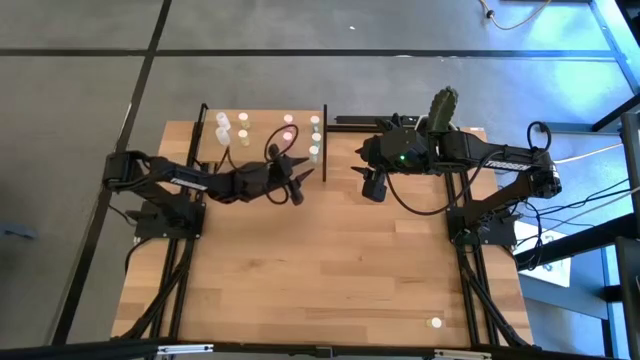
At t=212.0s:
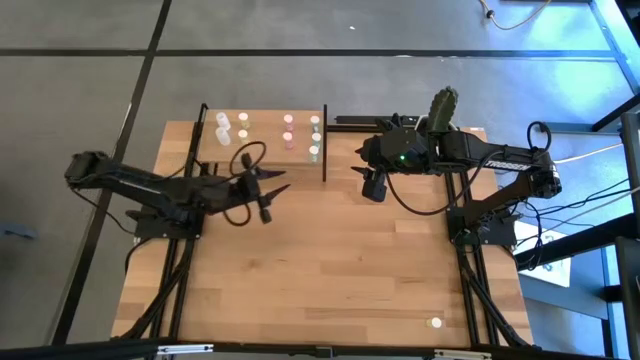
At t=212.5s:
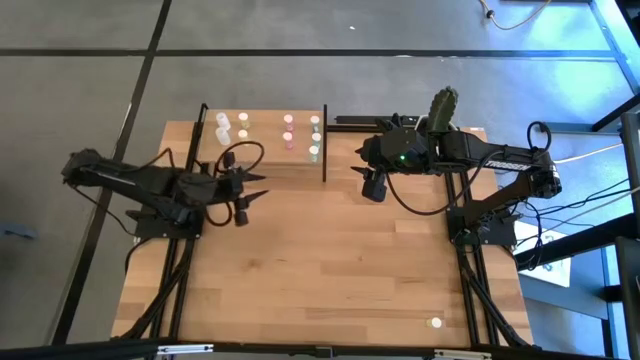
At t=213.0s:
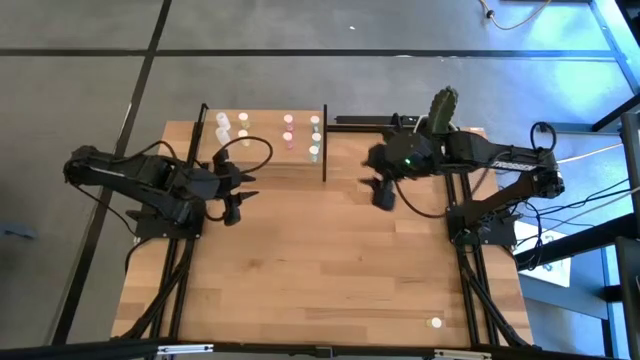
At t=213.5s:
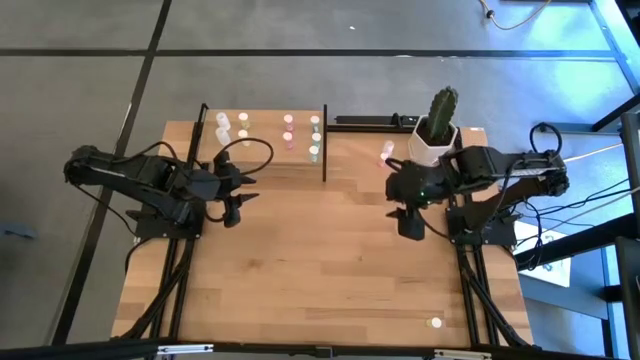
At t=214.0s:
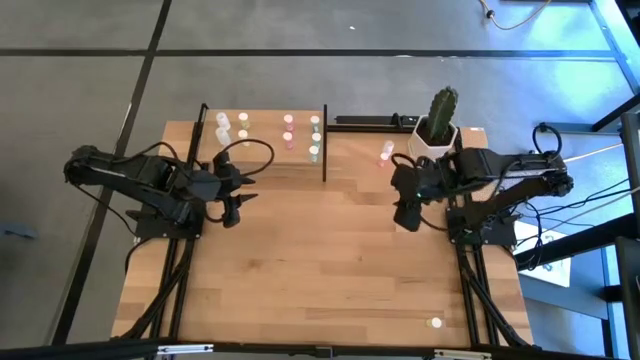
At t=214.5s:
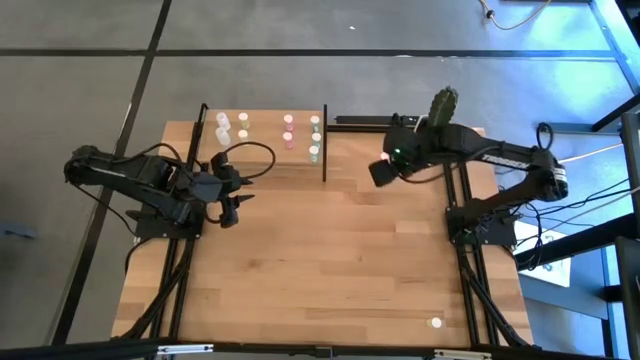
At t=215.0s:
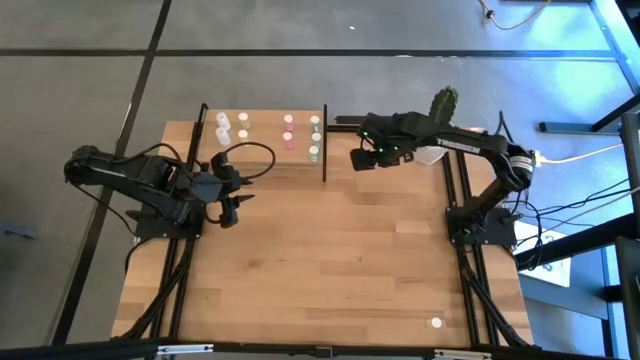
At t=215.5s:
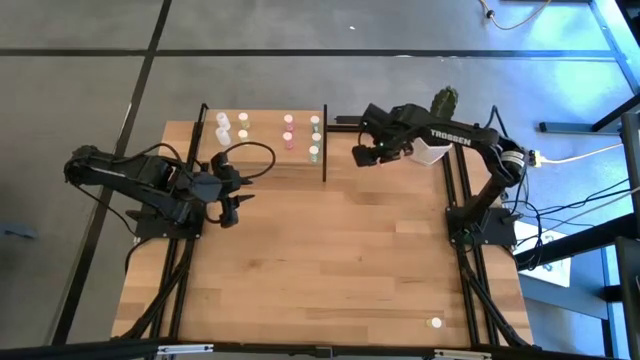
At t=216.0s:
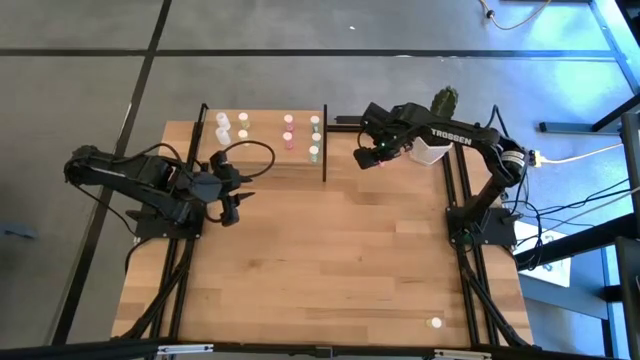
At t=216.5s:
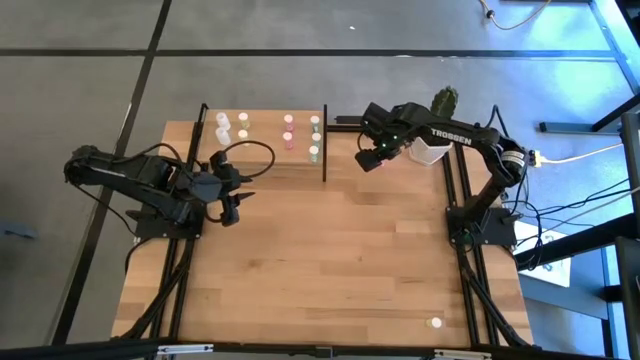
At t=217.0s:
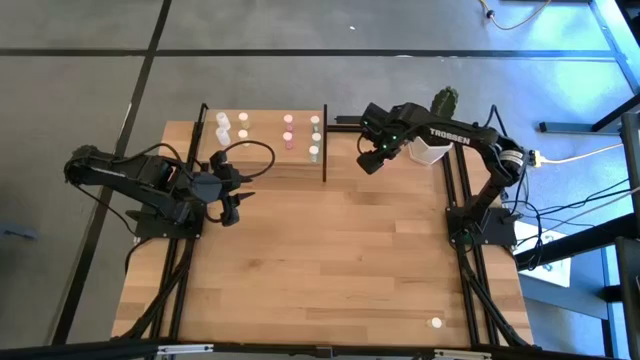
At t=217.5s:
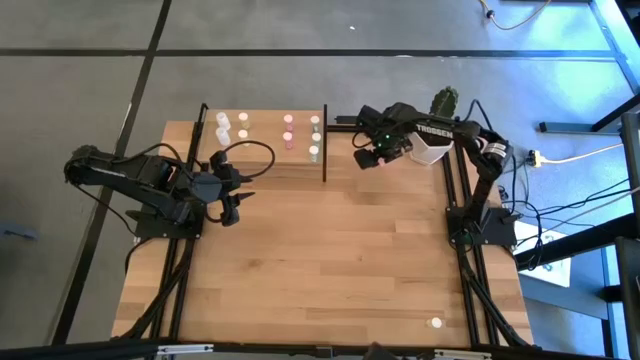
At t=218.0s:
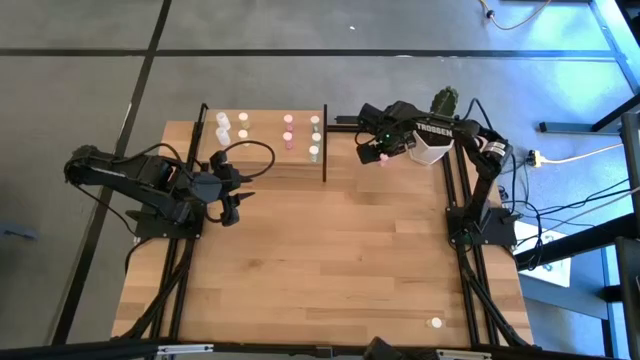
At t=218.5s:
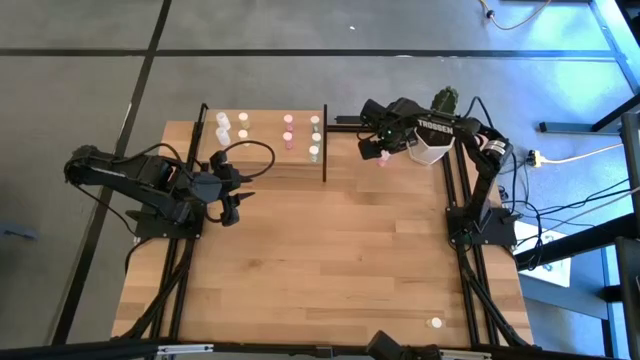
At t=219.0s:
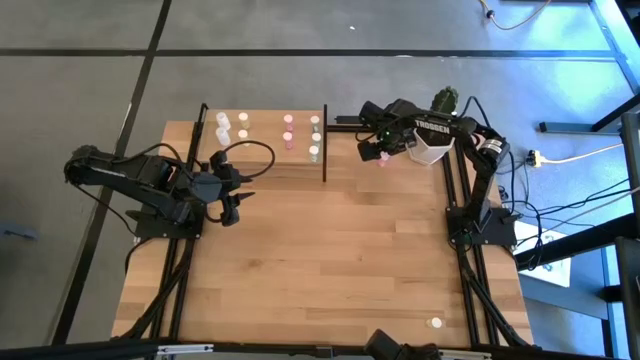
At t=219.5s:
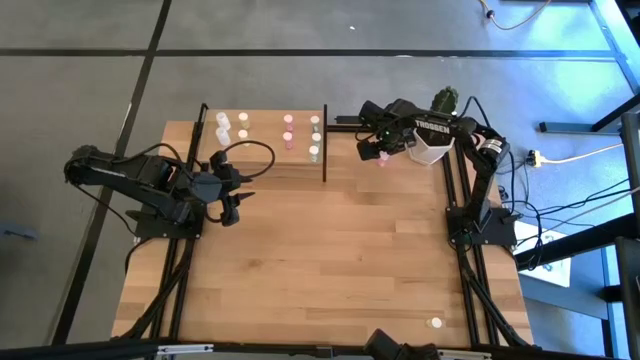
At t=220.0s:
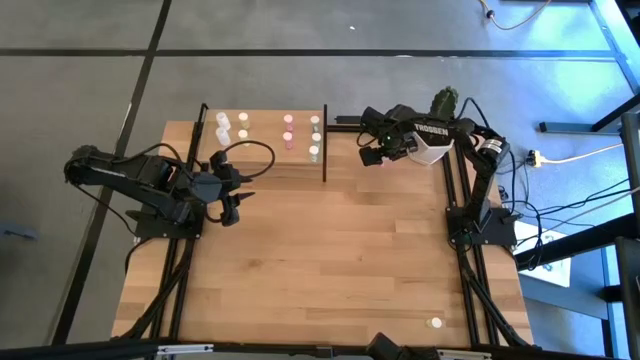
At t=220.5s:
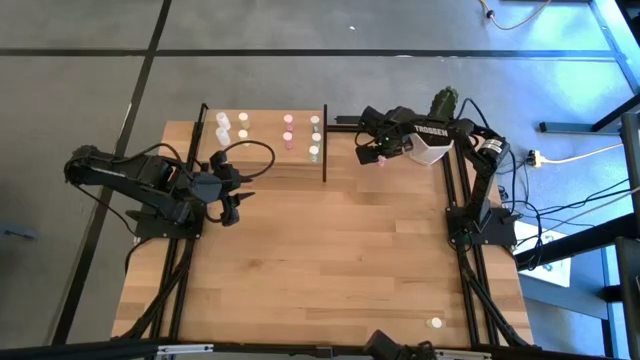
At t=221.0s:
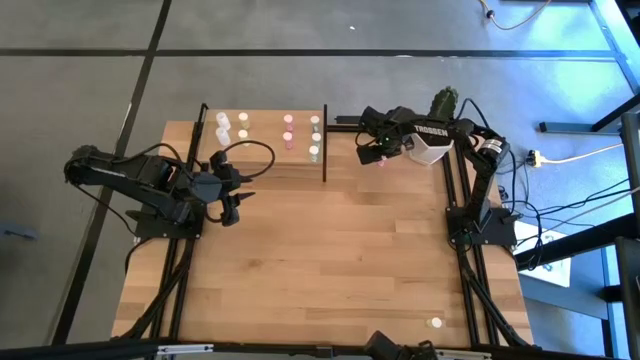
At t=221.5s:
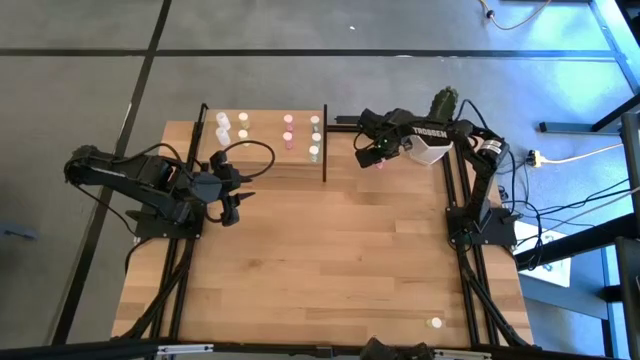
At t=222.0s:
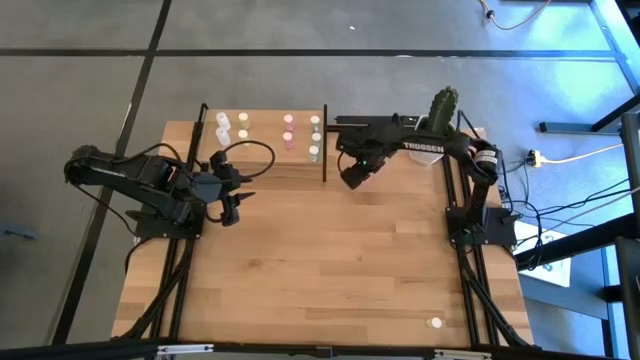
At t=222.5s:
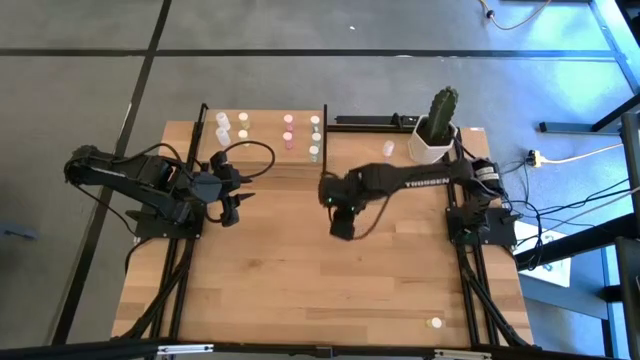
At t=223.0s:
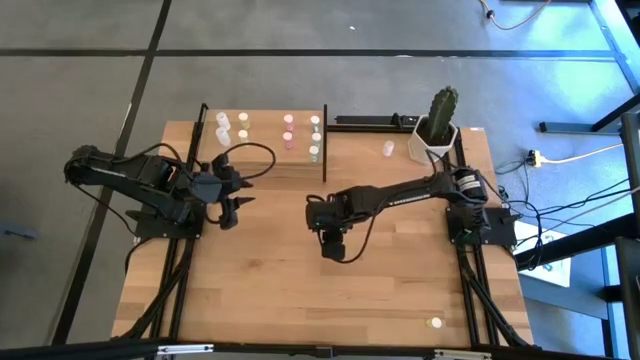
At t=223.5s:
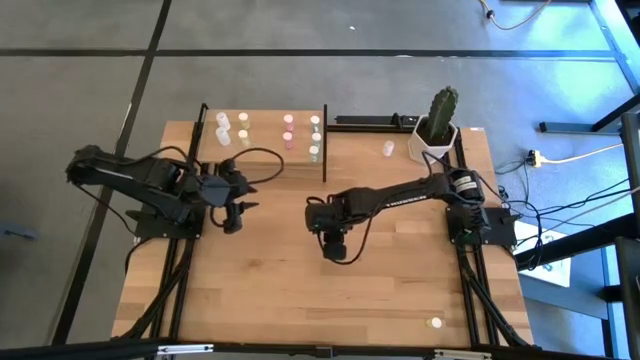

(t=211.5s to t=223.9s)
Task: Pick and place medicine bottles onto shelf by color
Put the pink pill bottle on the shelf and align it with the other pink pill bottles

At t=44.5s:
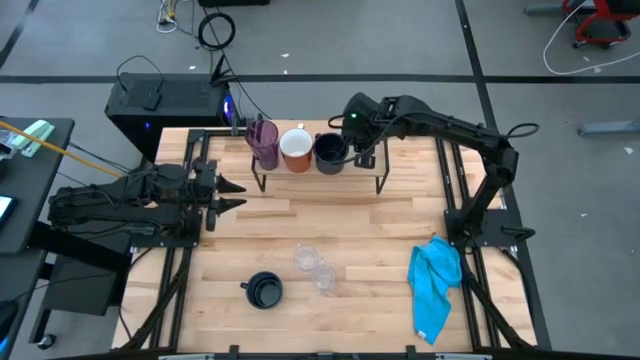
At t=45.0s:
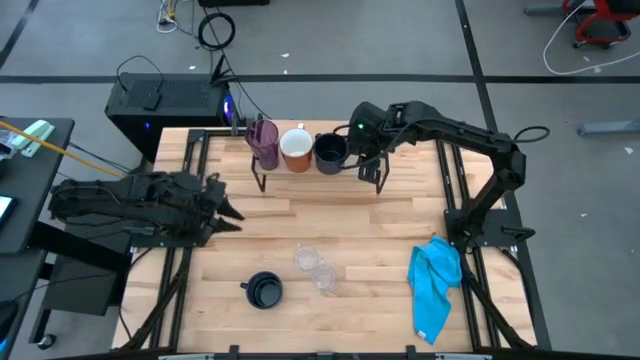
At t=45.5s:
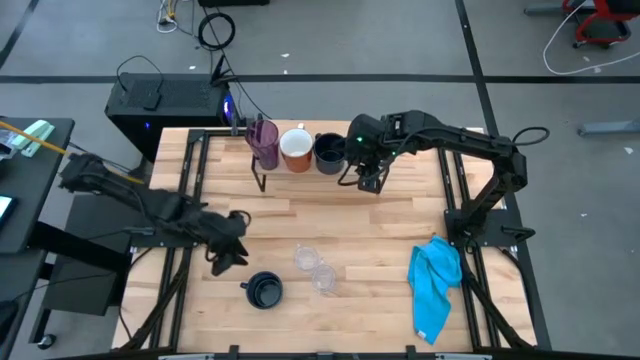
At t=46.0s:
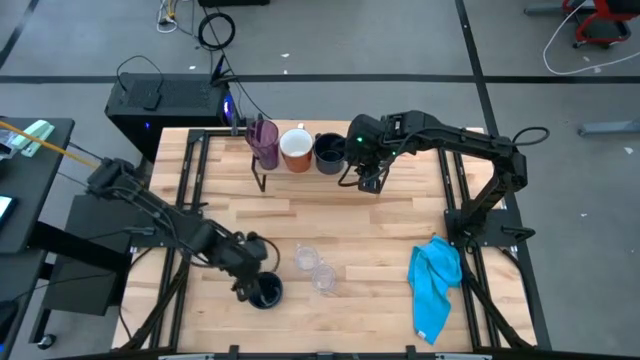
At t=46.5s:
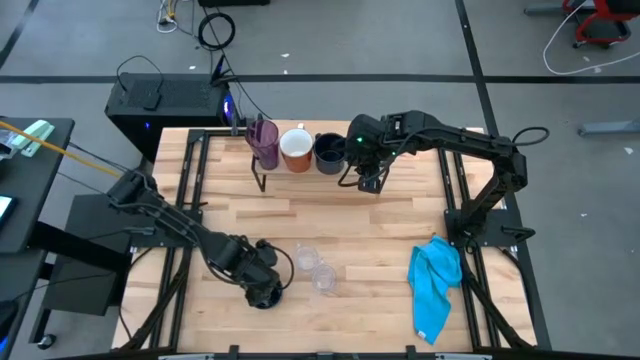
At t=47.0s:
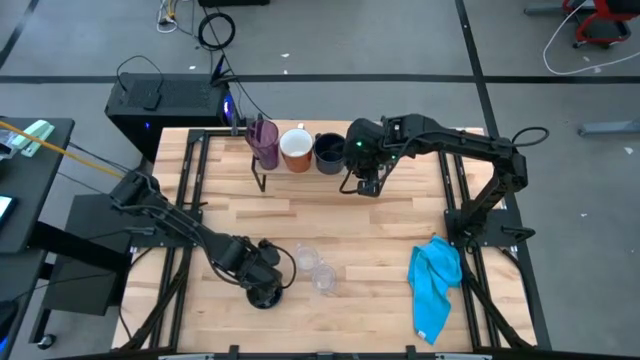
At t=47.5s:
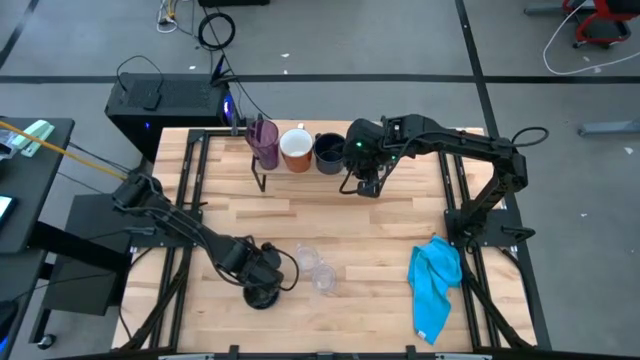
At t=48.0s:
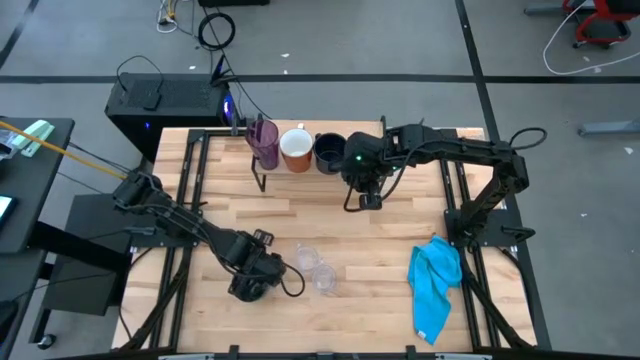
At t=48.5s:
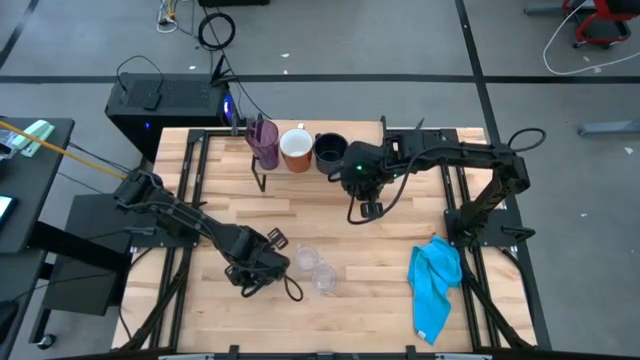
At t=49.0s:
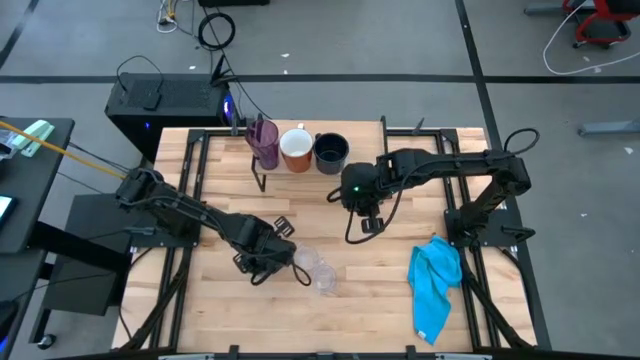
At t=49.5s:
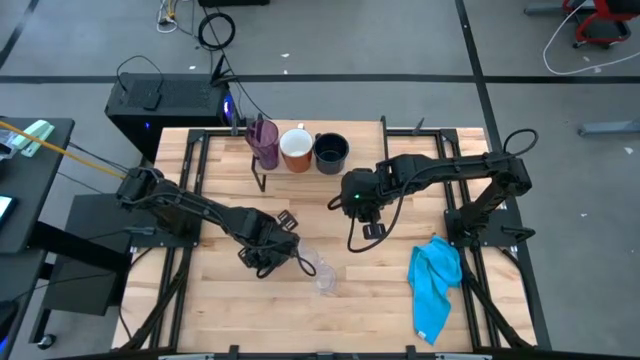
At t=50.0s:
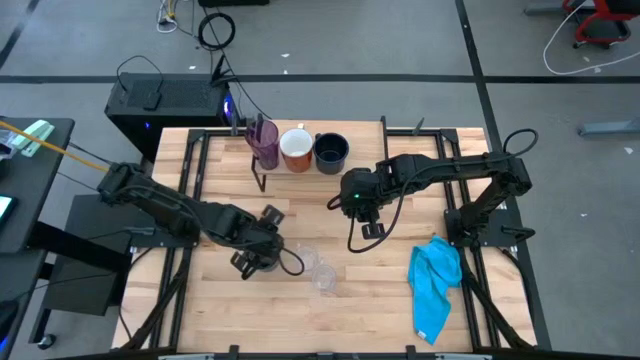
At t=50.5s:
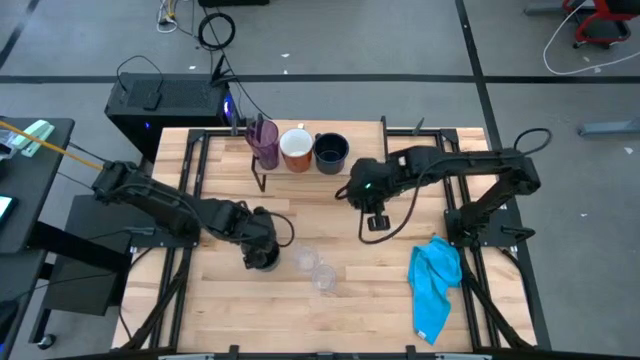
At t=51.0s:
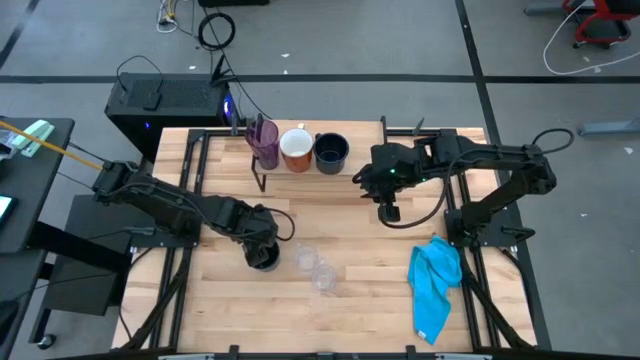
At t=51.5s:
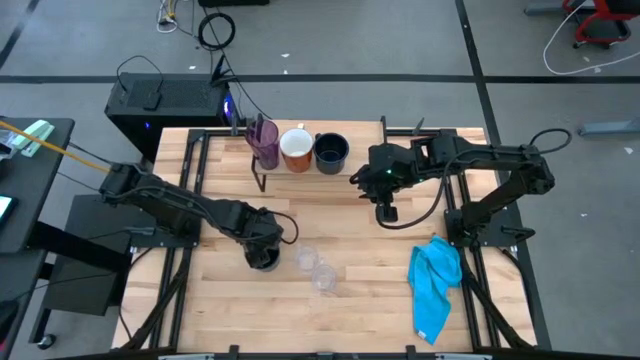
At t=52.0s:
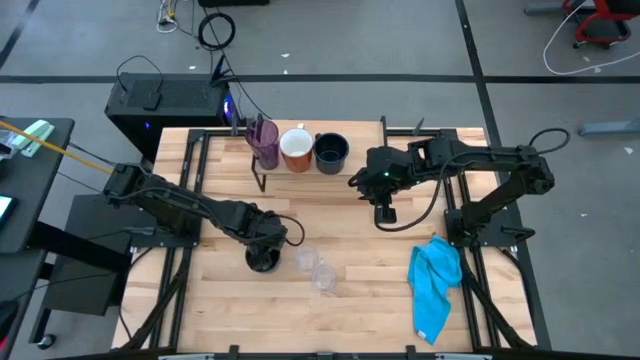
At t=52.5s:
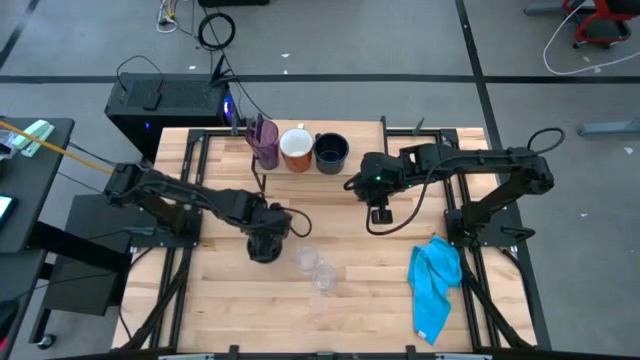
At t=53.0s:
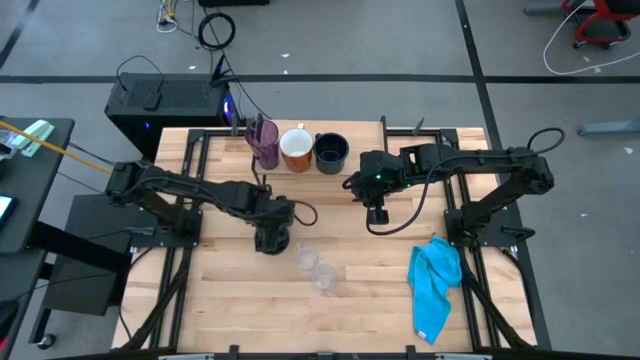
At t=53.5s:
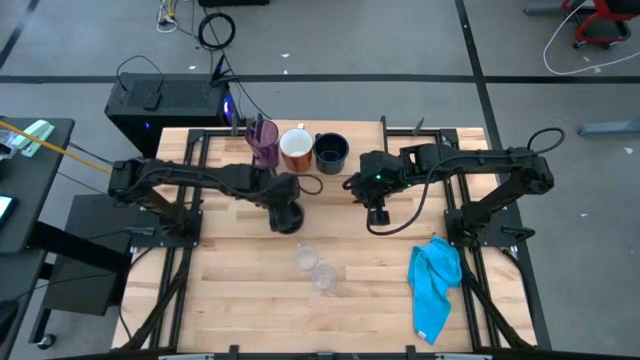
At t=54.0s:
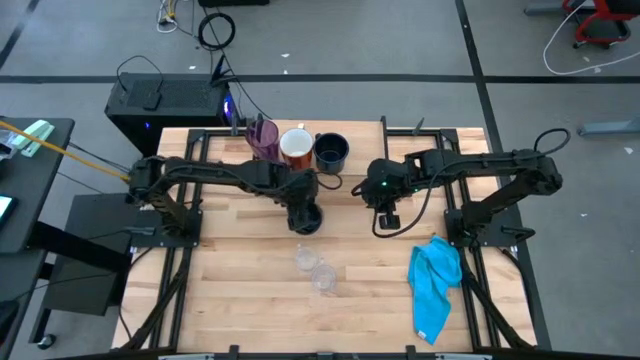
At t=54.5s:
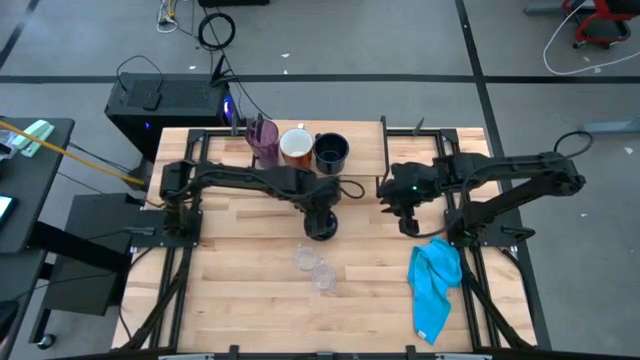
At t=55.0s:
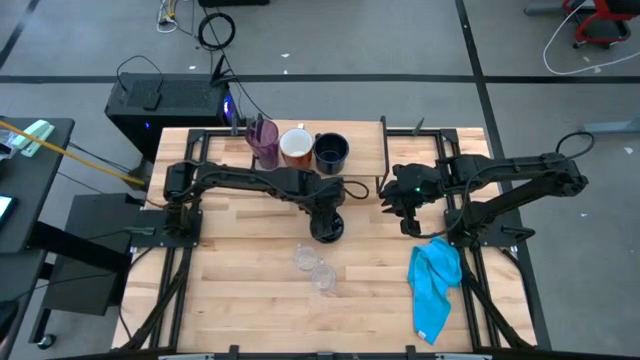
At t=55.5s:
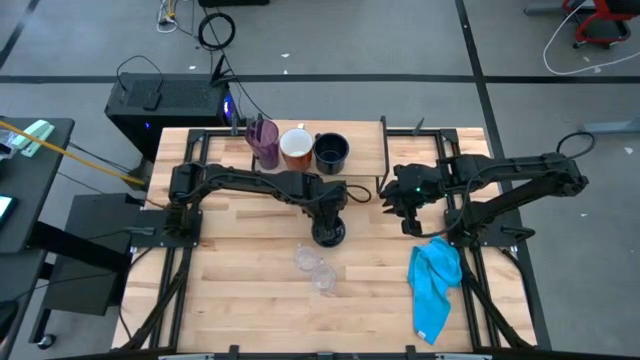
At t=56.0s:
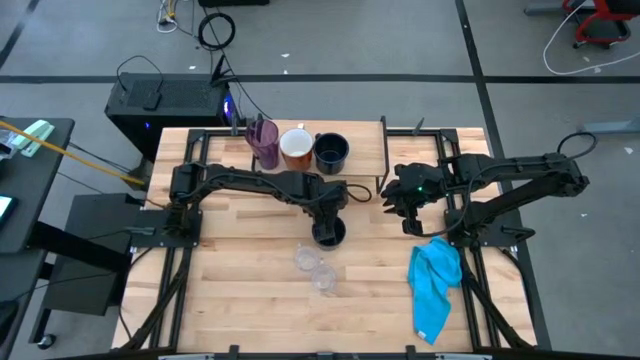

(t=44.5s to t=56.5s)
Task: Stack small to large cups/mugs on shelf
Move the dark blue mug to the center of the table
